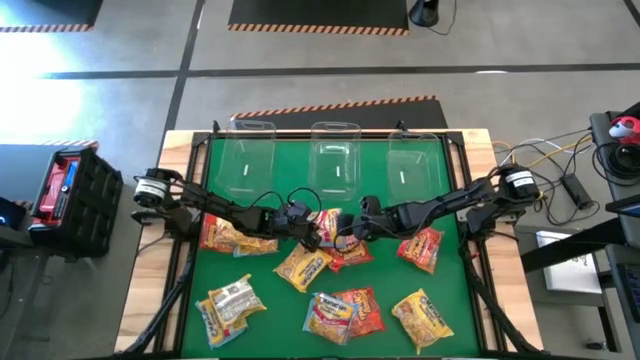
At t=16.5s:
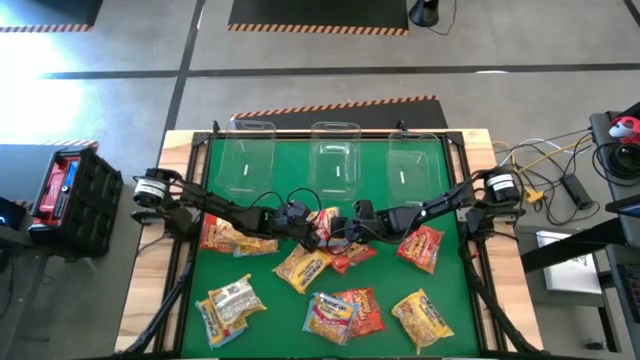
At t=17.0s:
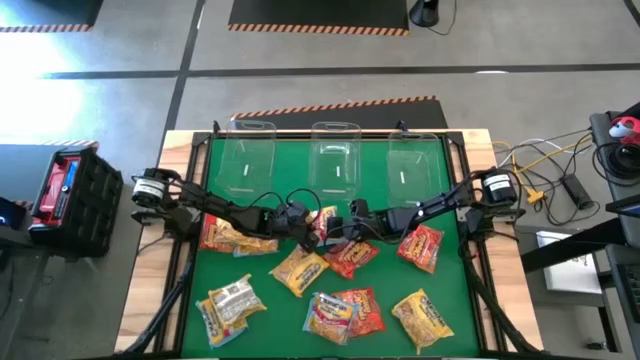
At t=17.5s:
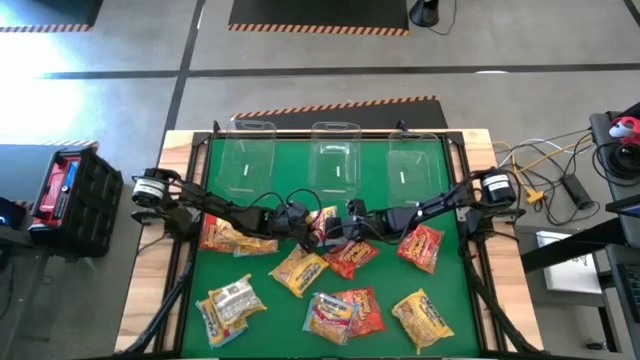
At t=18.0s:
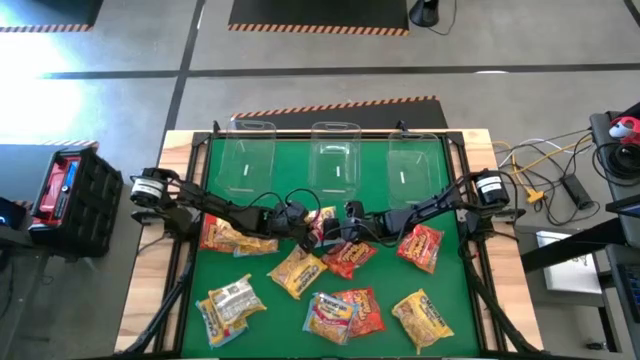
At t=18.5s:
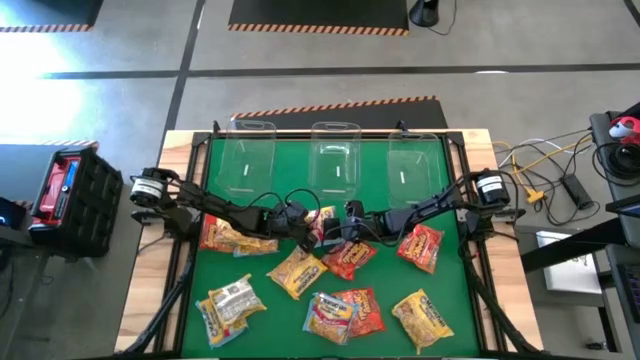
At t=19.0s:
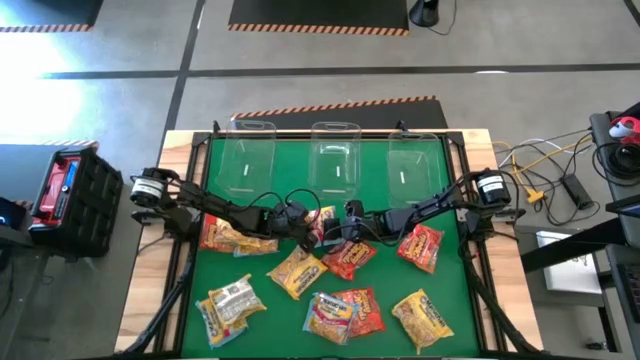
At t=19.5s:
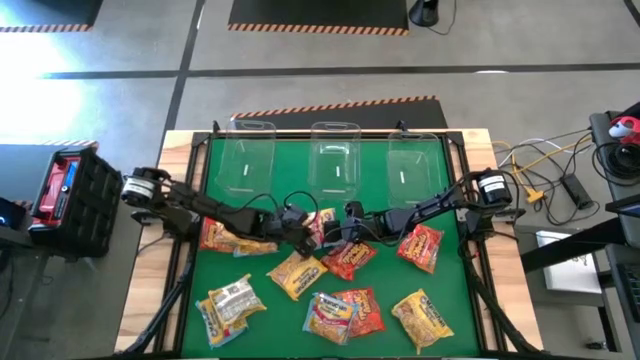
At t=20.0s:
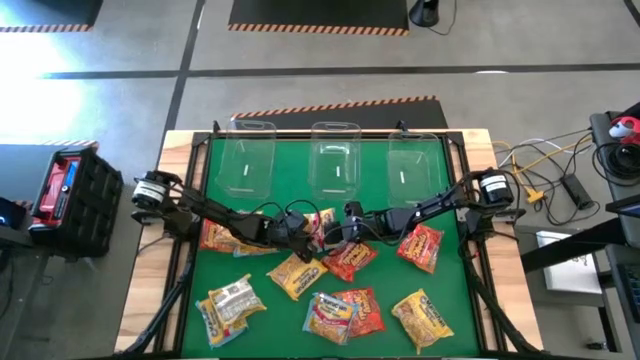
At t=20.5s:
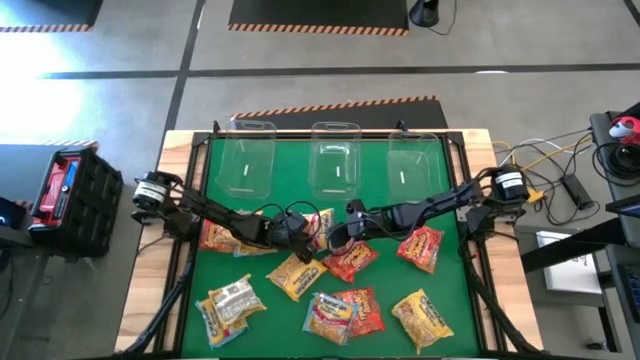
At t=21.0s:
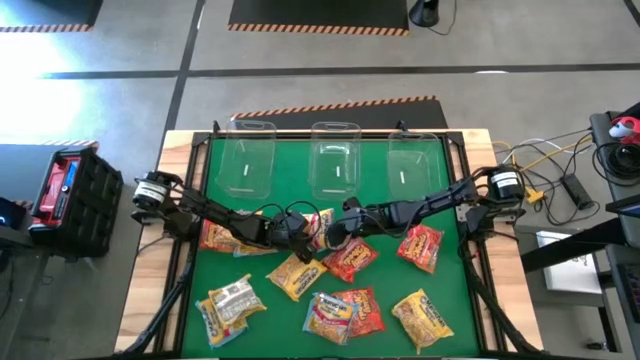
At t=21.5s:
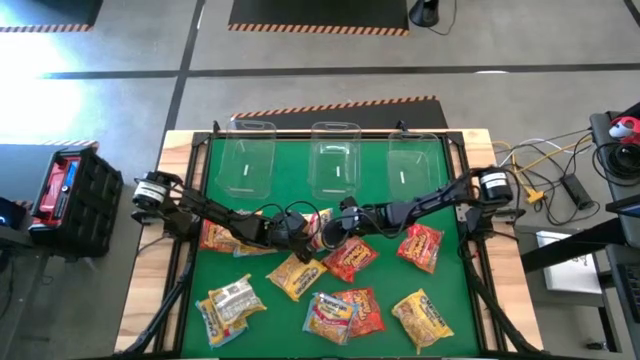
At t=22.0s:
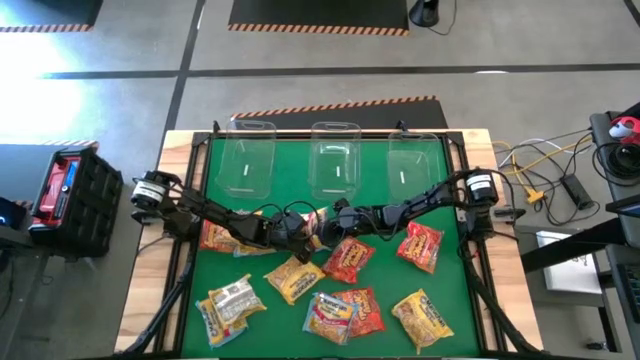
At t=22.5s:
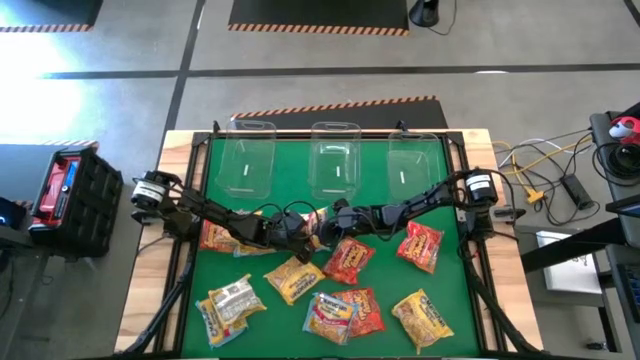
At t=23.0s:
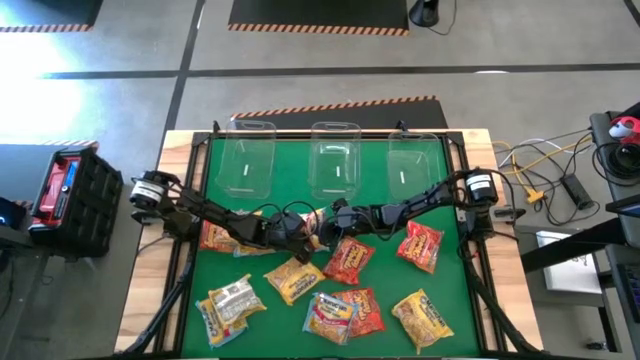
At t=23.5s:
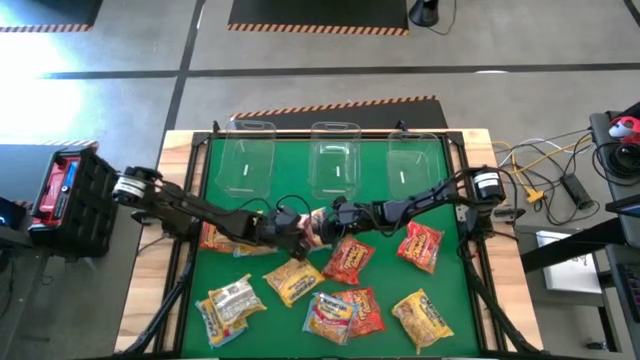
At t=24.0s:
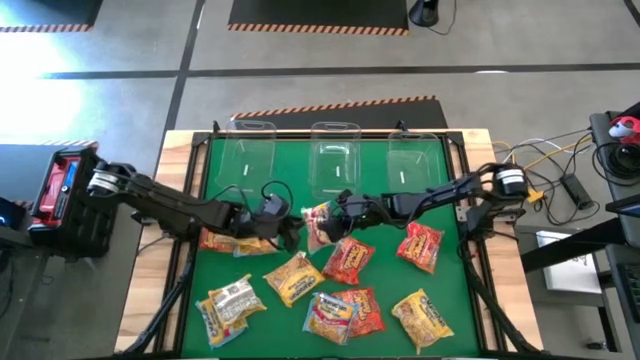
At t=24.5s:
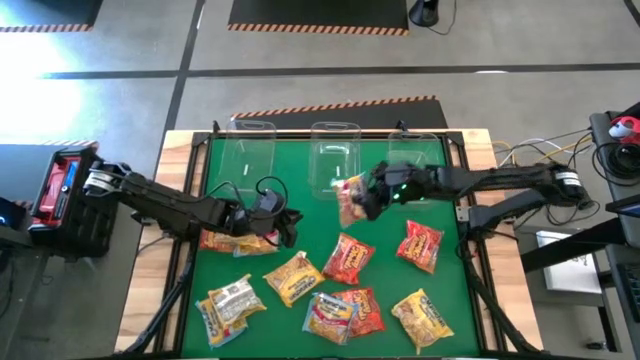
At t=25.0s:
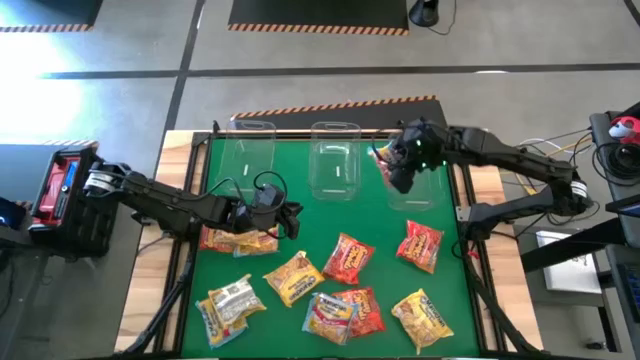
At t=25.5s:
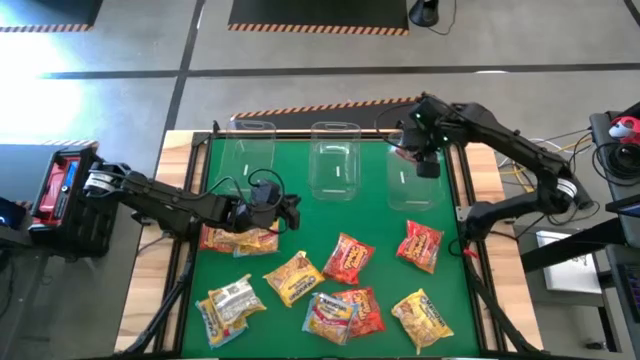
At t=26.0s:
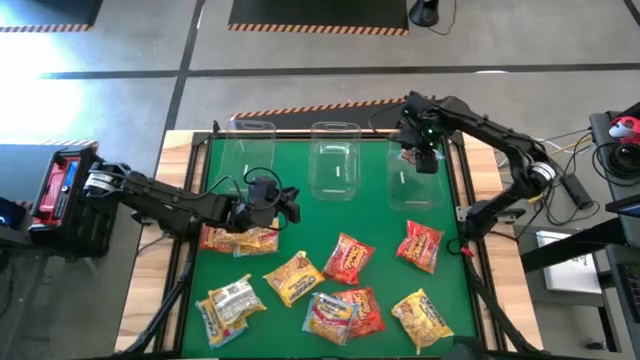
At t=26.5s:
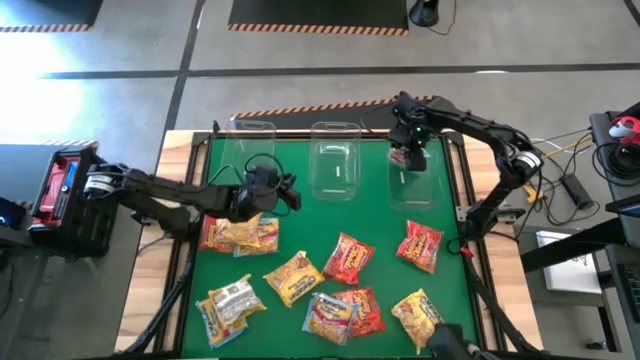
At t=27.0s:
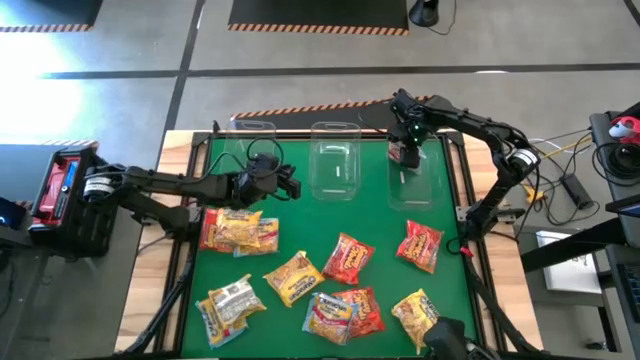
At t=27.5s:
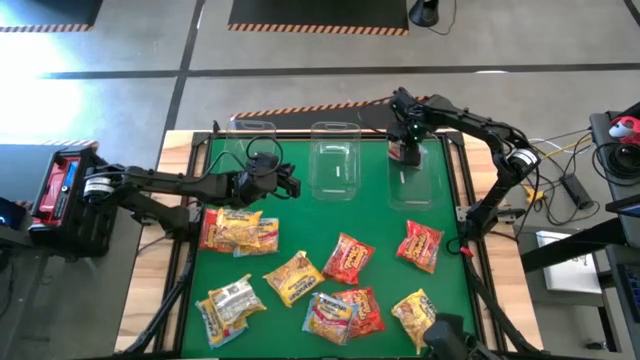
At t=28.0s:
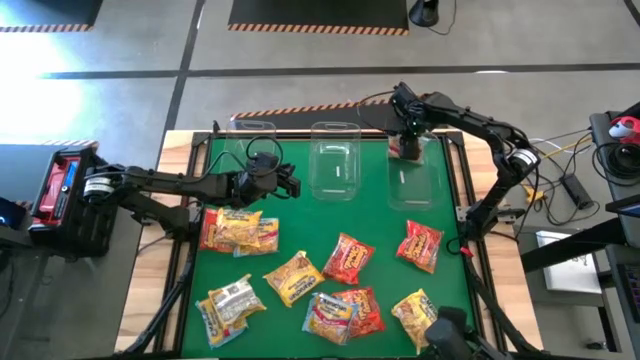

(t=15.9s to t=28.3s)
Task: Sort Maruchan noodles
Put the blue noodle pack into the right transparent bin

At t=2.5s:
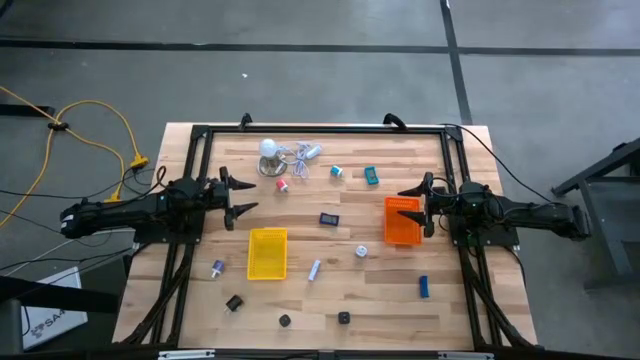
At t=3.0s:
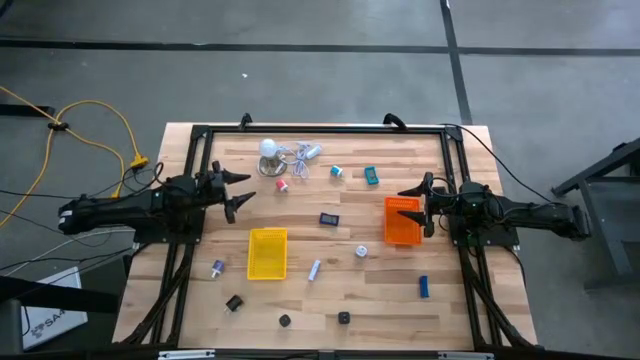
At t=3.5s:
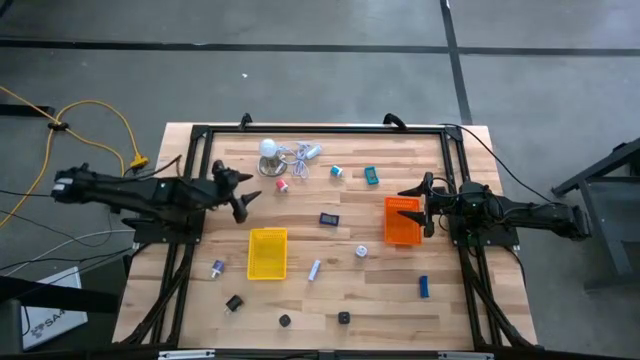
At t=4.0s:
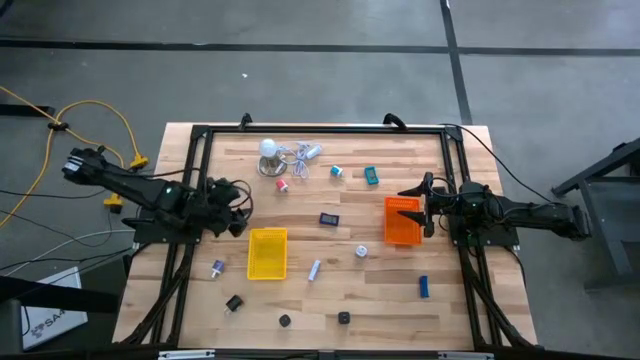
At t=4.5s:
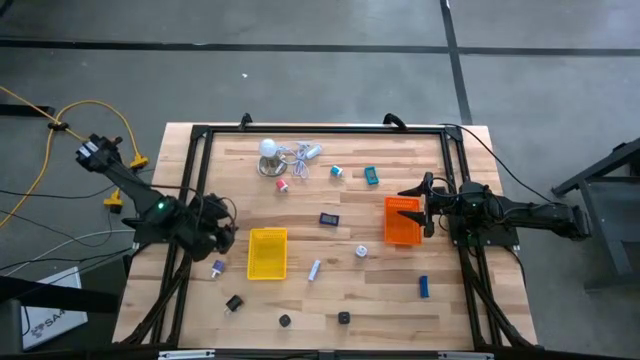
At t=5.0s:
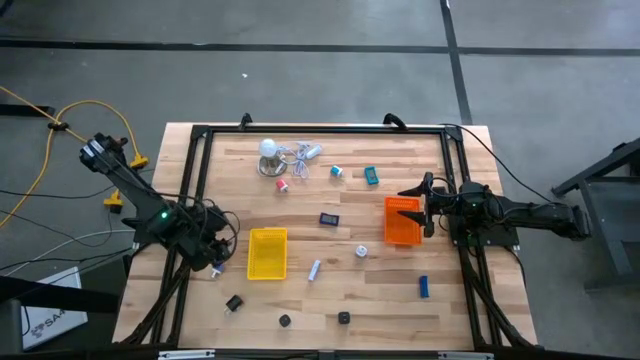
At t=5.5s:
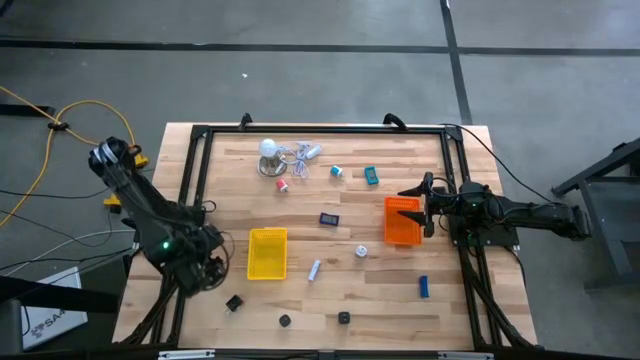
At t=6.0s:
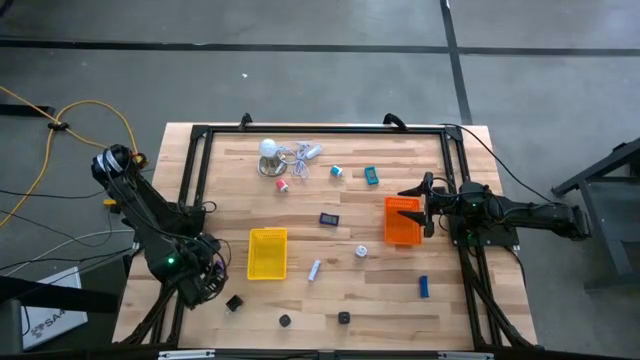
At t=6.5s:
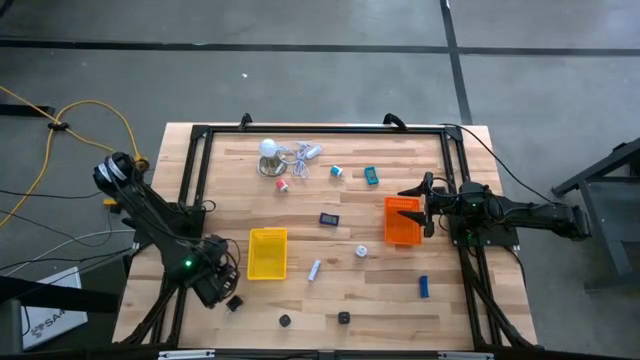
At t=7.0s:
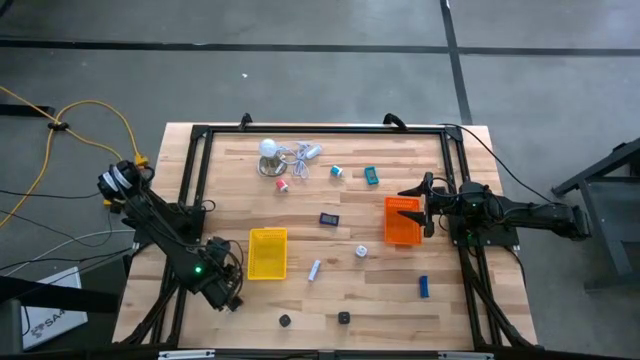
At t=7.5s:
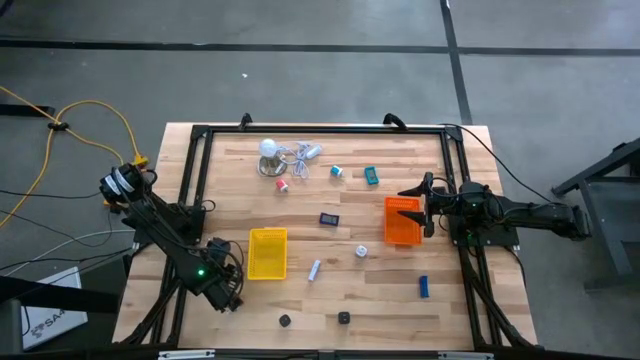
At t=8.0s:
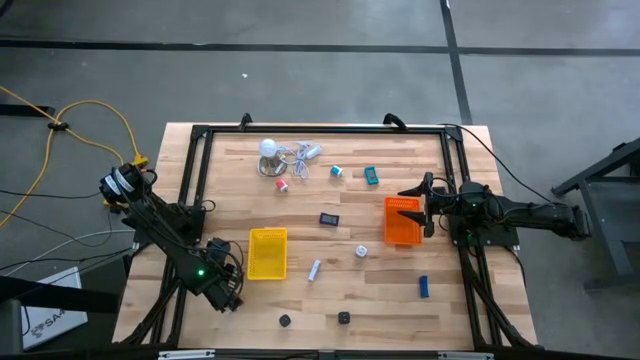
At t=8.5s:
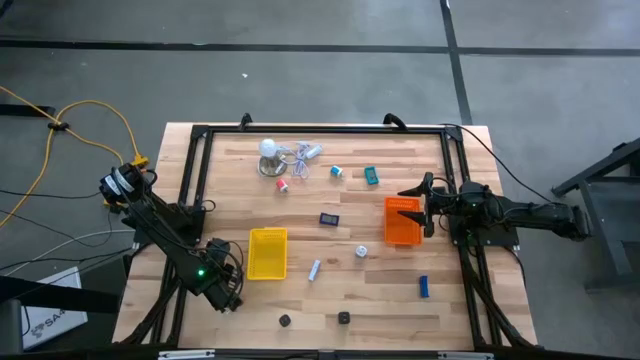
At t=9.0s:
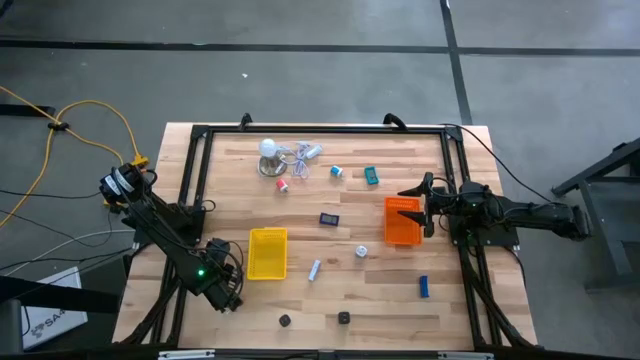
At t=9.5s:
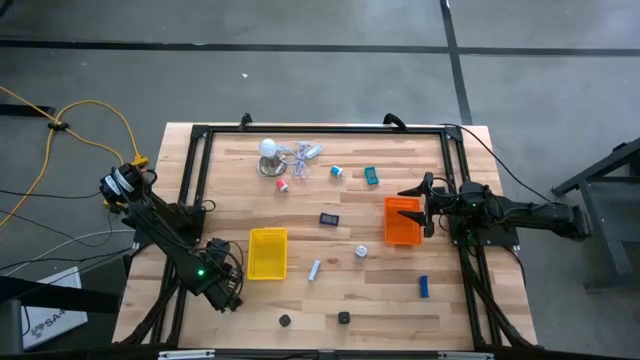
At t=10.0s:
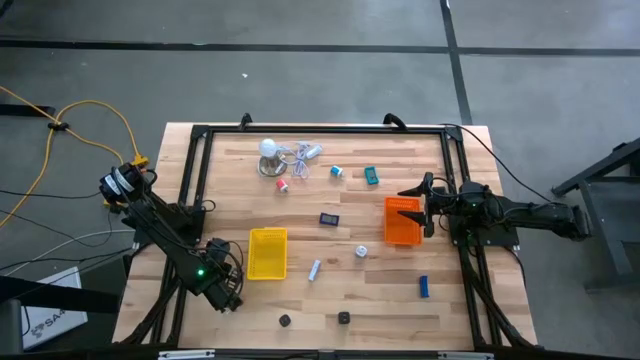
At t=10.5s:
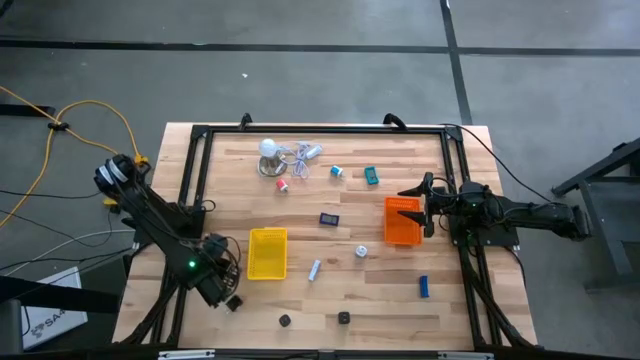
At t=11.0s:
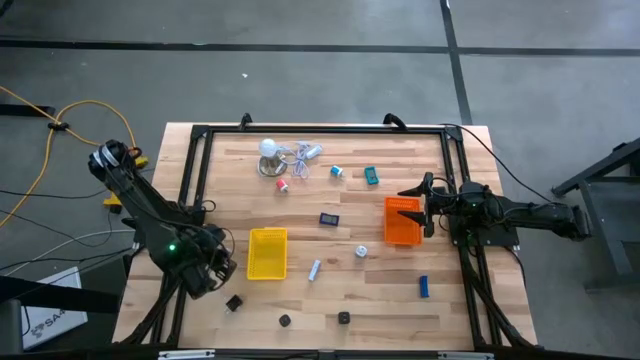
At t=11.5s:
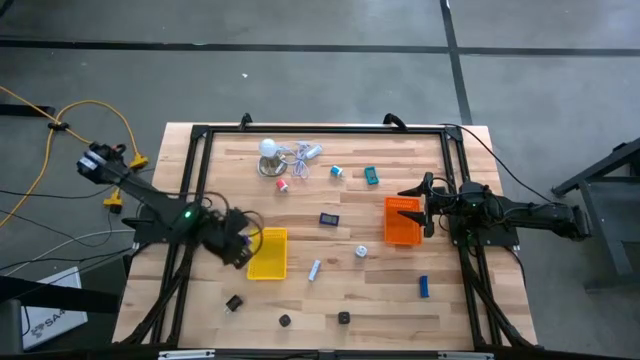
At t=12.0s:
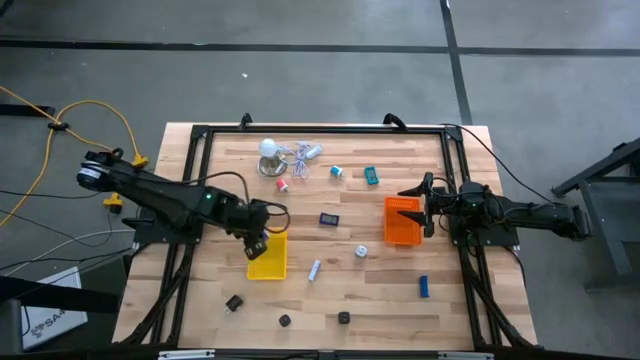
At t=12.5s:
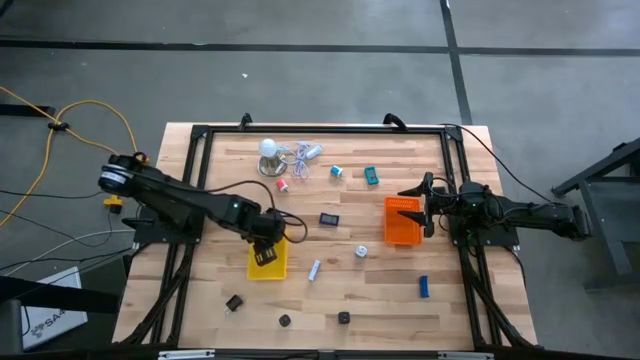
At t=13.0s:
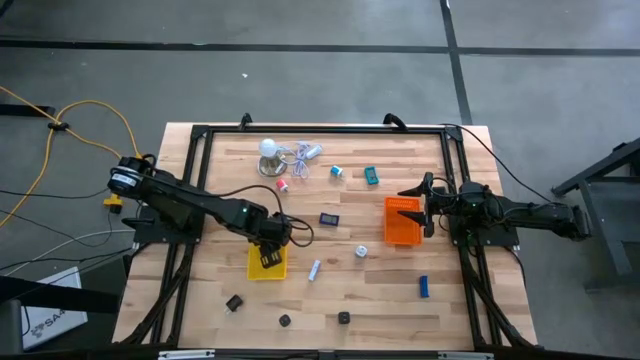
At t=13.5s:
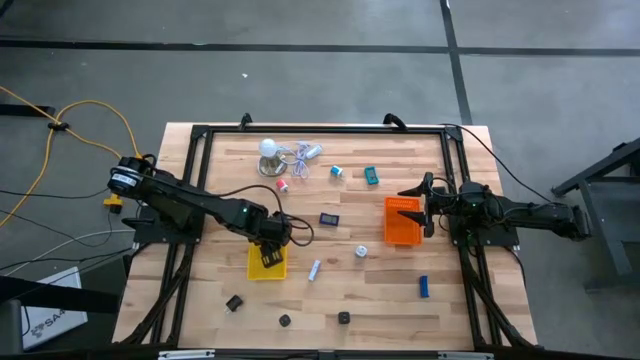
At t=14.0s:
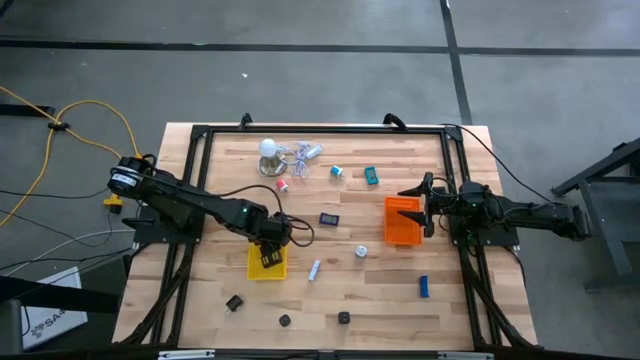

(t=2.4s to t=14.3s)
Task: Pick & Place Office items
Put the purple charger adapter into the yellow bin
